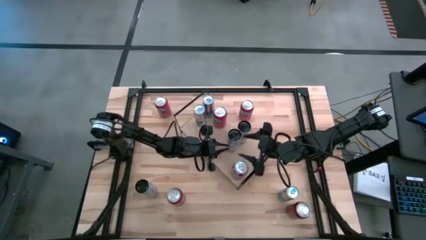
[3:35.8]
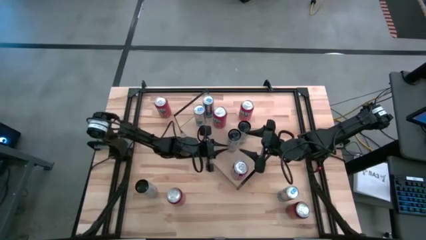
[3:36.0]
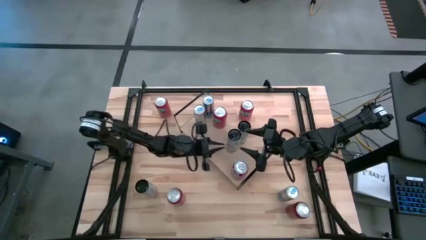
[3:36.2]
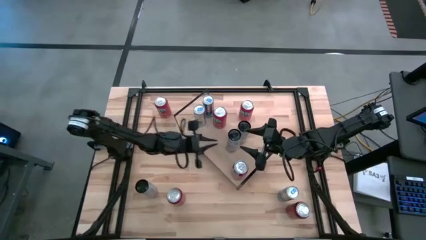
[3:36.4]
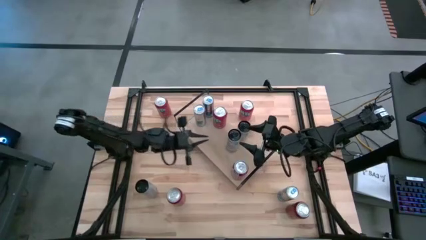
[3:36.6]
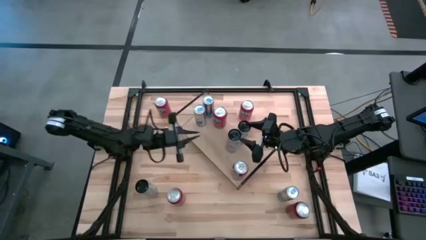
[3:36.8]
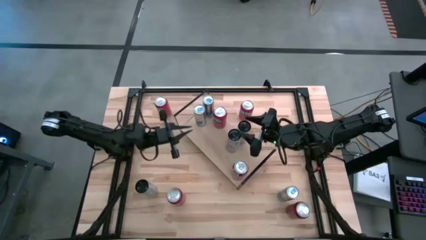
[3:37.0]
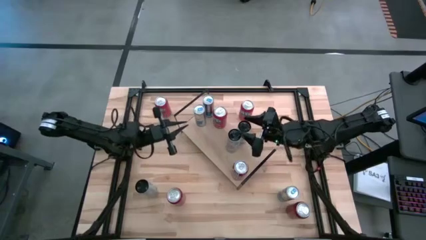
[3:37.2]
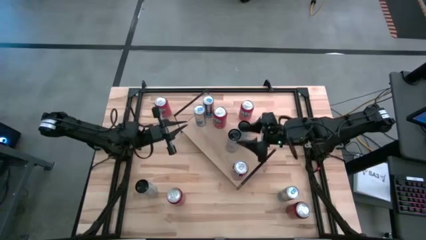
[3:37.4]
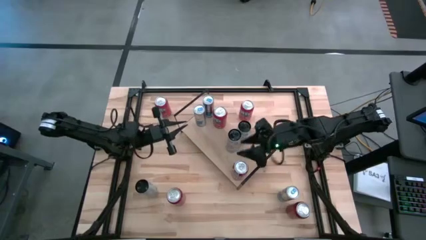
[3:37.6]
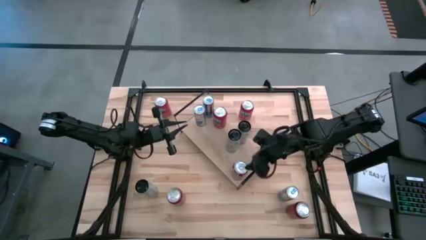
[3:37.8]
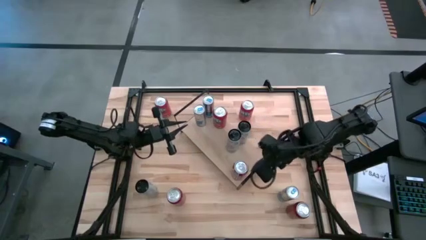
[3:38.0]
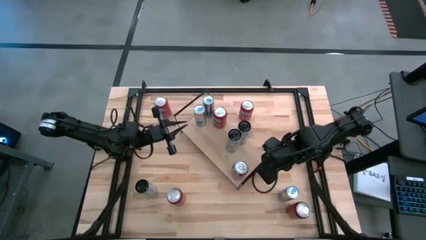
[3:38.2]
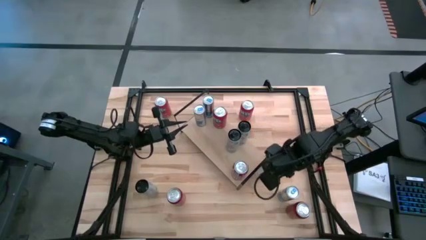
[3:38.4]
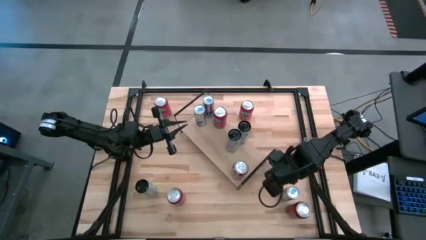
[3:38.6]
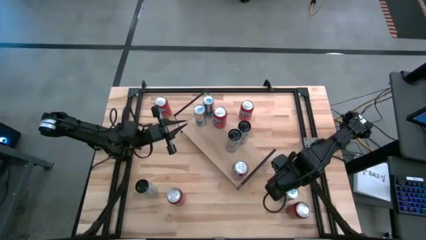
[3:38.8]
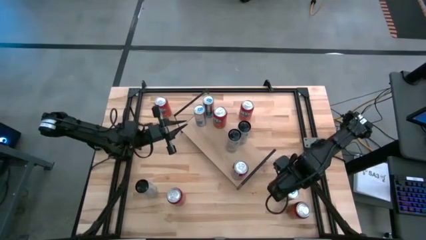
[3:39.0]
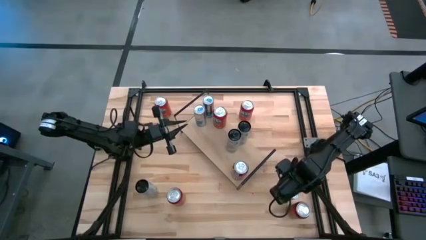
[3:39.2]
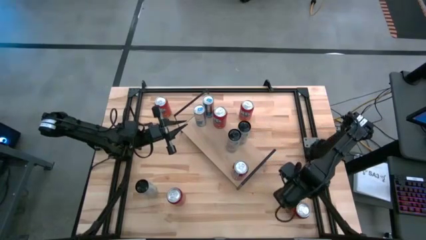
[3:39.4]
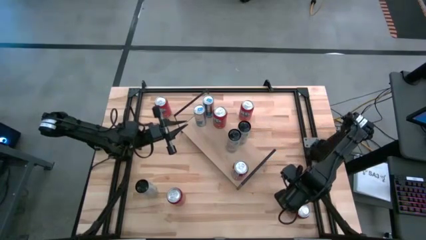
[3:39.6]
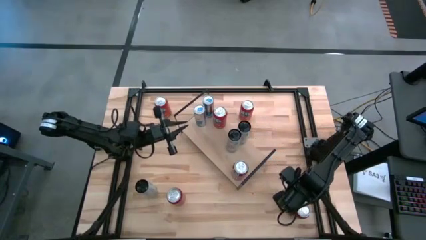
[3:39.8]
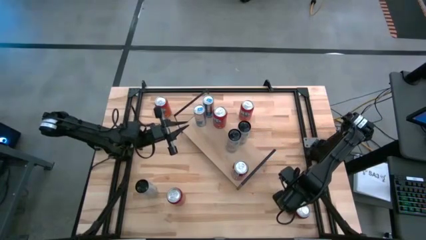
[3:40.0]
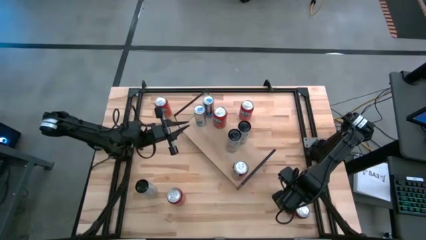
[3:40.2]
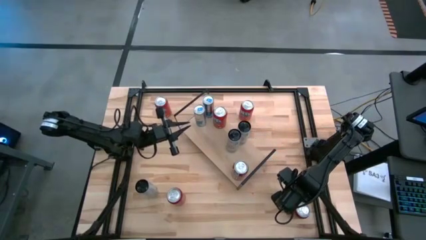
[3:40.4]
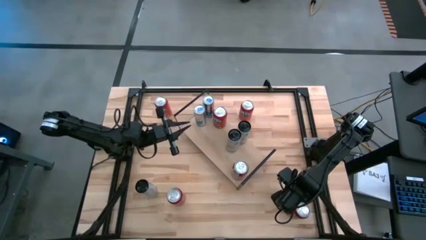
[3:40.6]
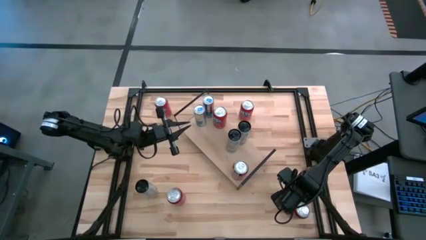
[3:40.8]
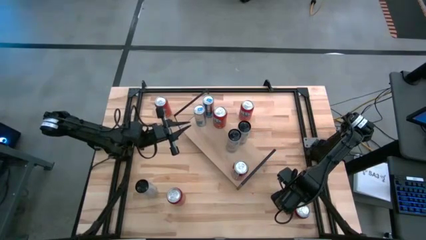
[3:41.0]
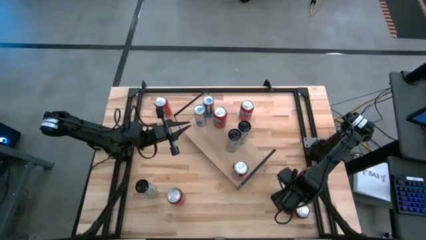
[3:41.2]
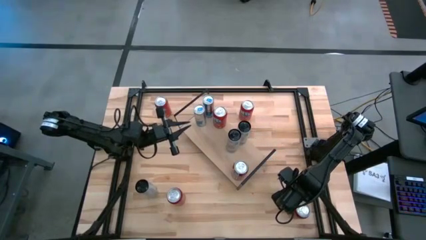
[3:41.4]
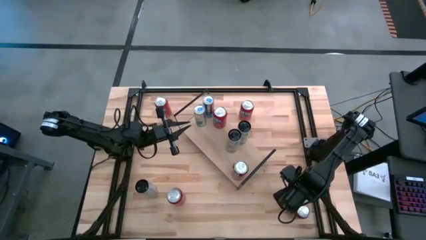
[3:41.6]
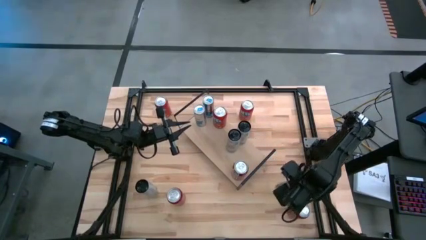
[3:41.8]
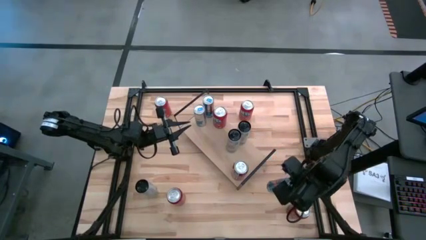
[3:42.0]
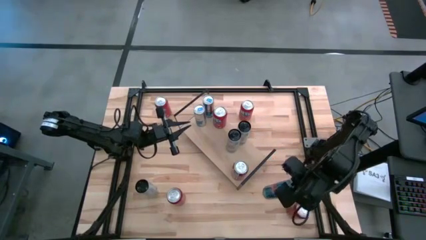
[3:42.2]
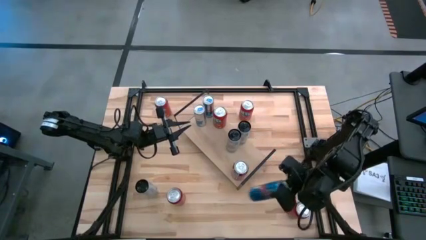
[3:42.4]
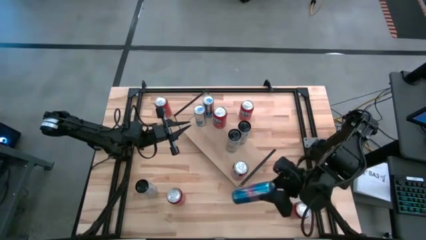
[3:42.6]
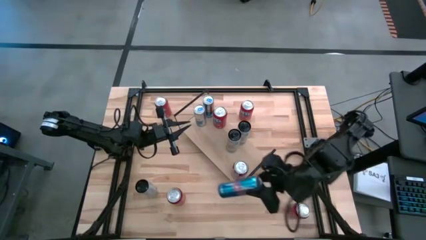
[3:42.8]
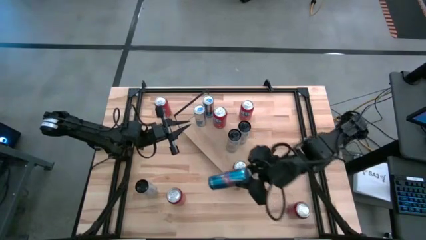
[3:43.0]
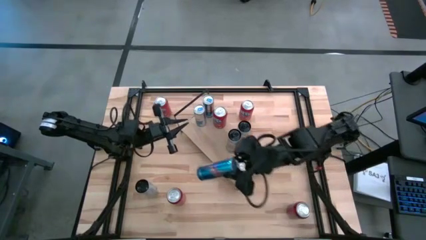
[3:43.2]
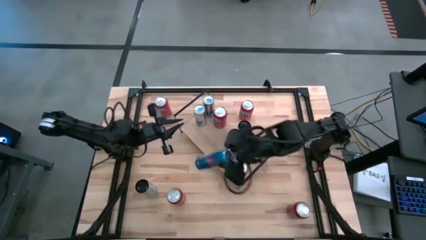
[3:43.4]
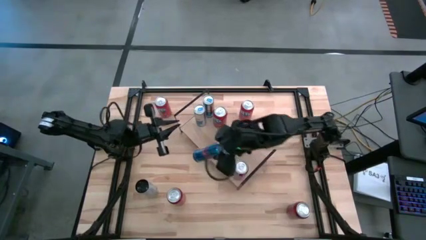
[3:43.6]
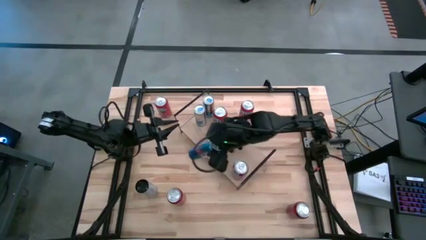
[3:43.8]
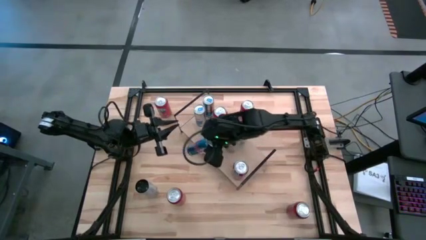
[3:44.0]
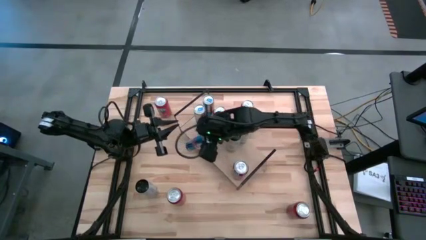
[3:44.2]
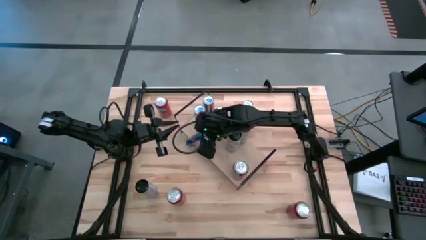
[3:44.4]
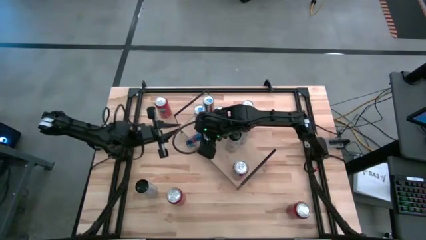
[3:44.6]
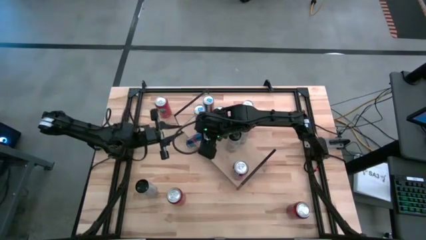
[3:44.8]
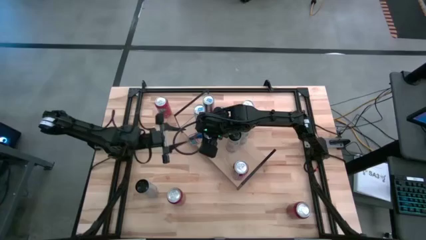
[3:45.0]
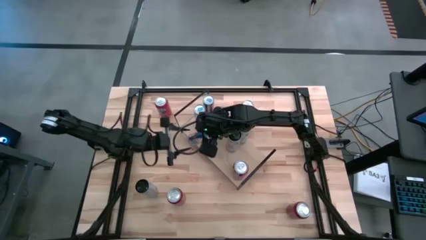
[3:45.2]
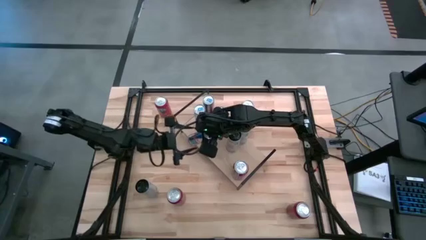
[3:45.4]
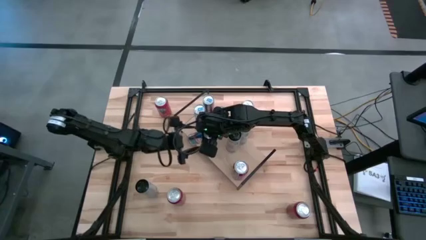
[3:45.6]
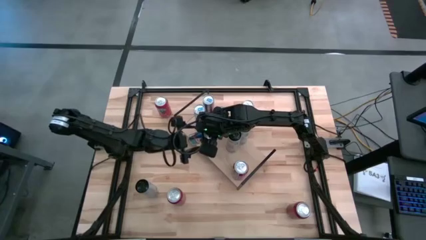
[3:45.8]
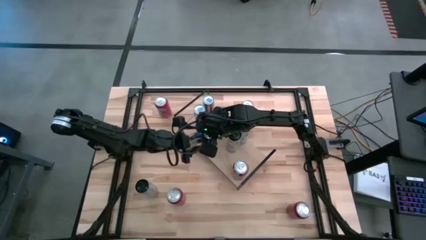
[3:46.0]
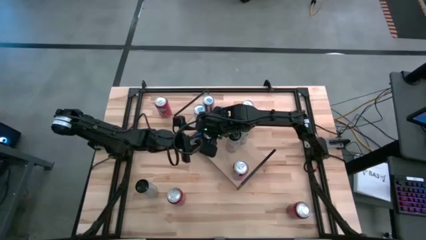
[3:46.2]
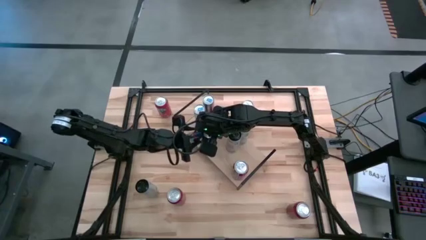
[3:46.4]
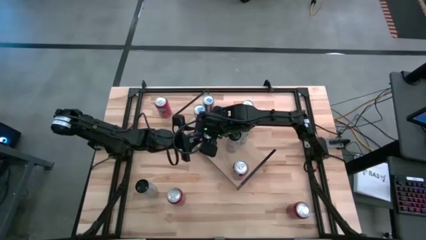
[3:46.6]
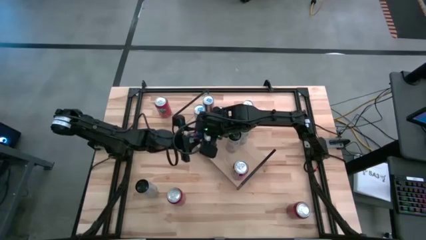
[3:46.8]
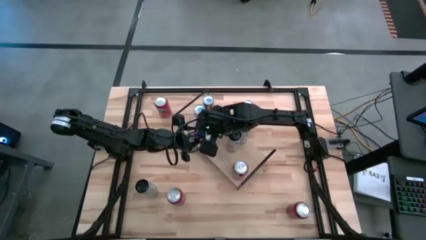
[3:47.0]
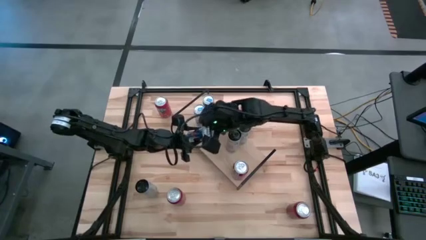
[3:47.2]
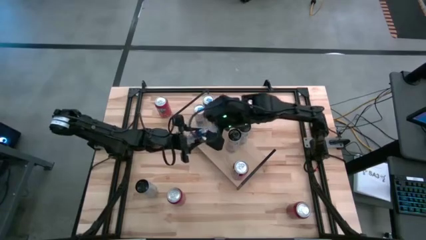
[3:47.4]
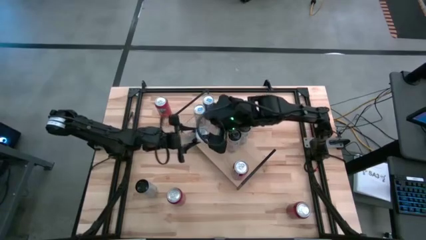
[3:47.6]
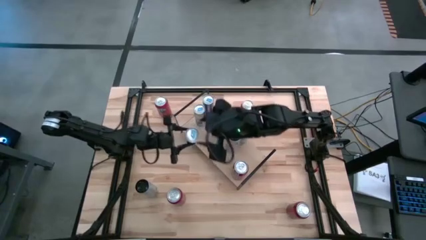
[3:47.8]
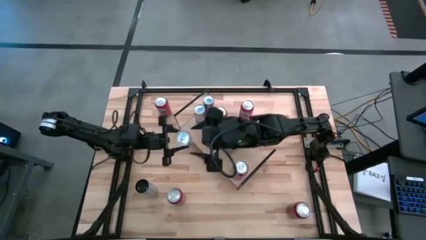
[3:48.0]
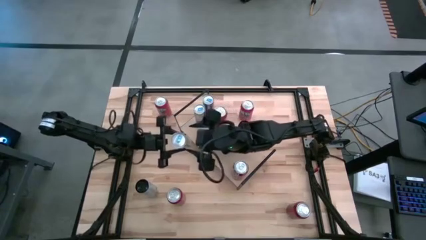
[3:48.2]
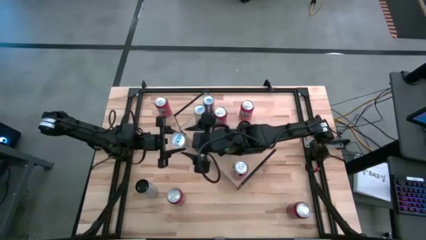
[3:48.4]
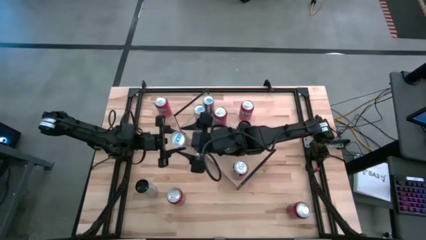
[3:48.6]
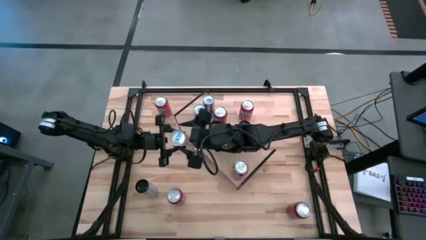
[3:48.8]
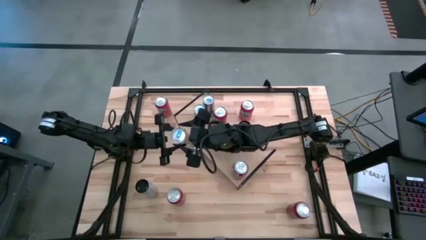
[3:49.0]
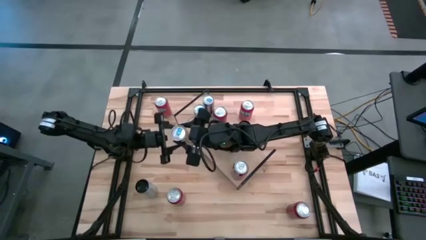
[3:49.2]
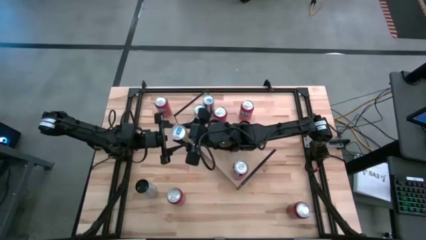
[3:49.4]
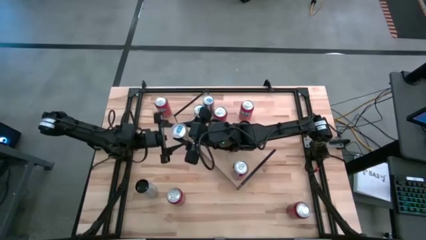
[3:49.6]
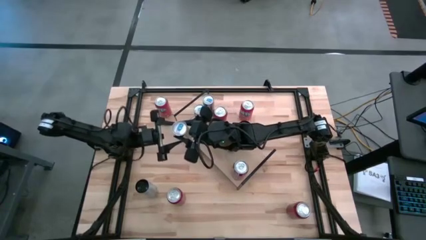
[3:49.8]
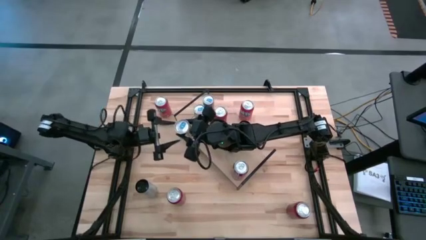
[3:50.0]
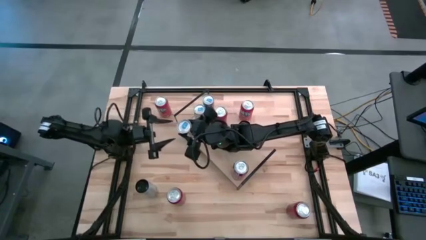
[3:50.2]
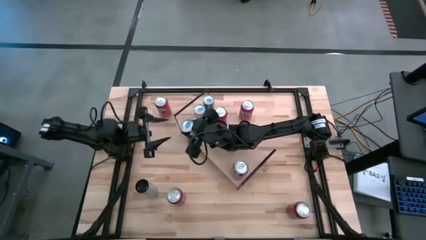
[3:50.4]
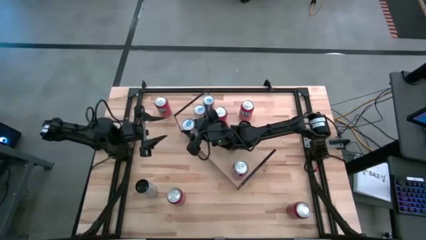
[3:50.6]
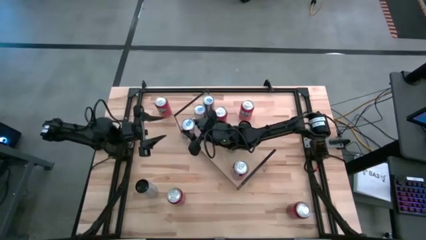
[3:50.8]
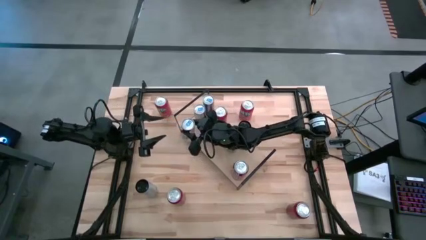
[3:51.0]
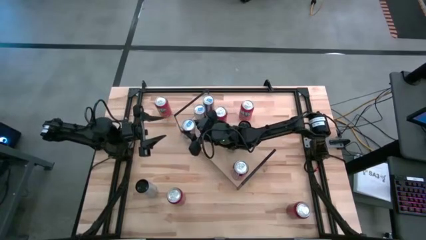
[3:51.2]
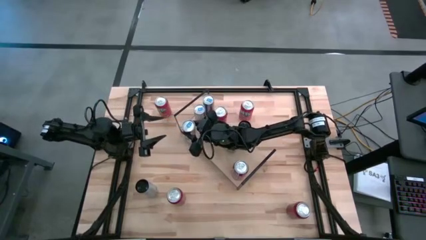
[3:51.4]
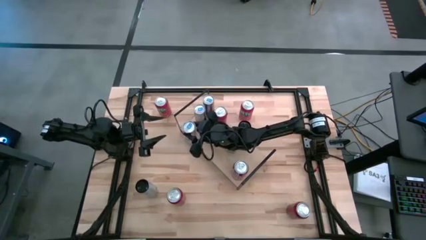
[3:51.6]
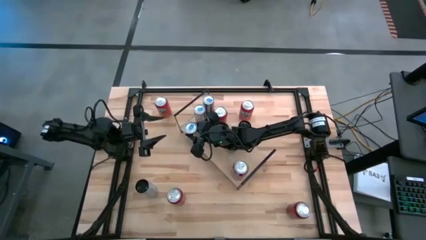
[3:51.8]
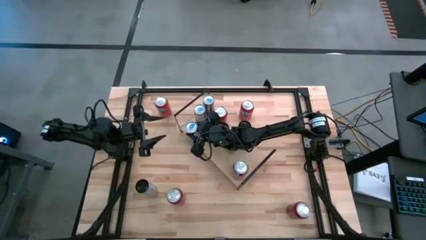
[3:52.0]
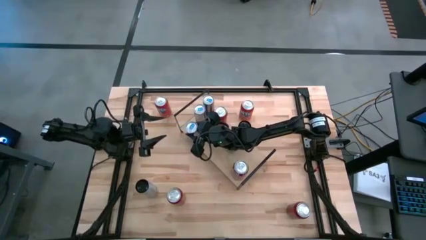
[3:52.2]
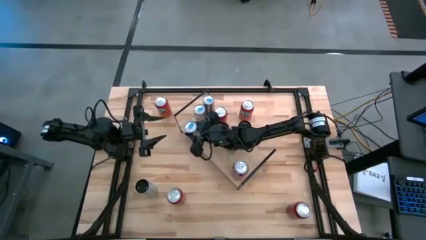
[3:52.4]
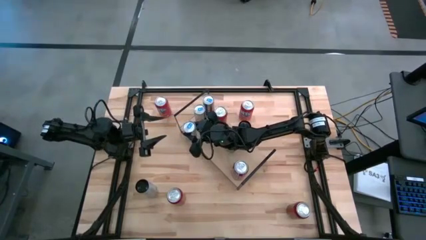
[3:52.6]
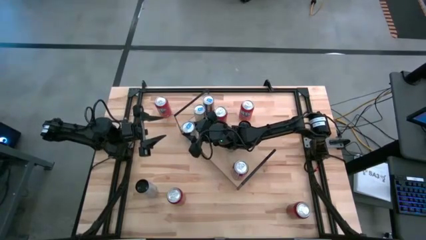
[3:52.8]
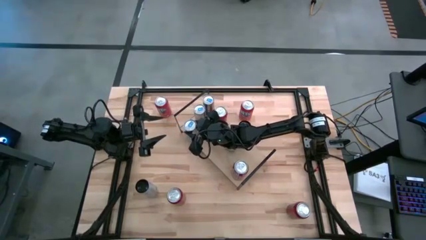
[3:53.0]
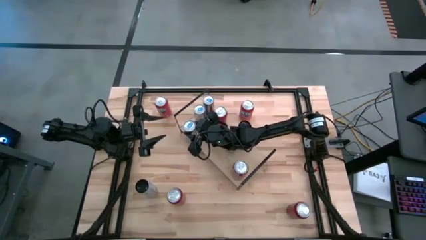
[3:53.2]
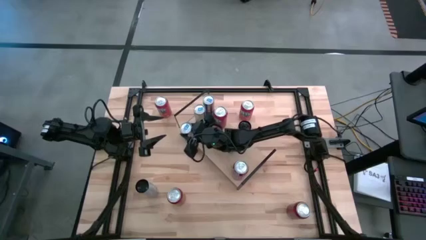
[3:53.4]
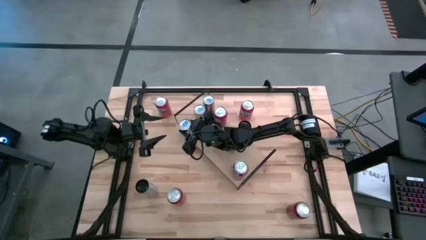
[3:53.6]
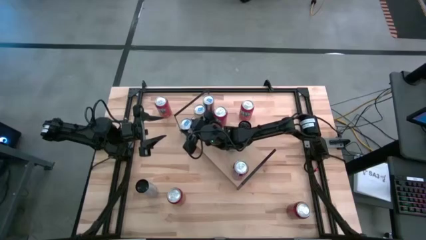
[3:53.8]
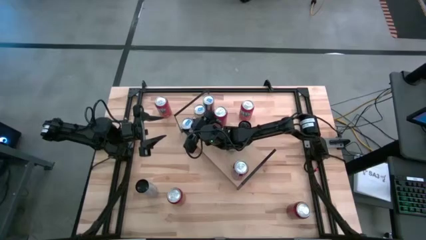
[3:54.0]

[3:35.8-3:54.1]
Task: Place canned beverage on shelf
Put the blue soda can on the shelf aligned with the blue can on the shelf
